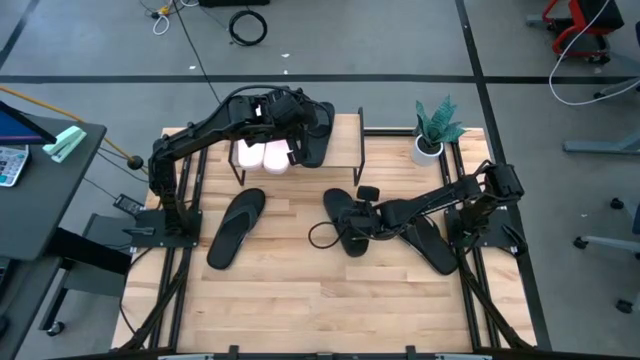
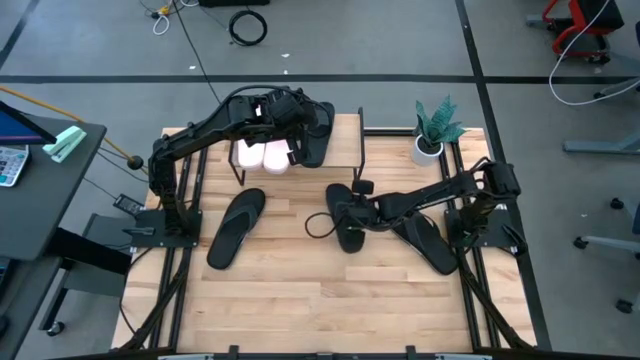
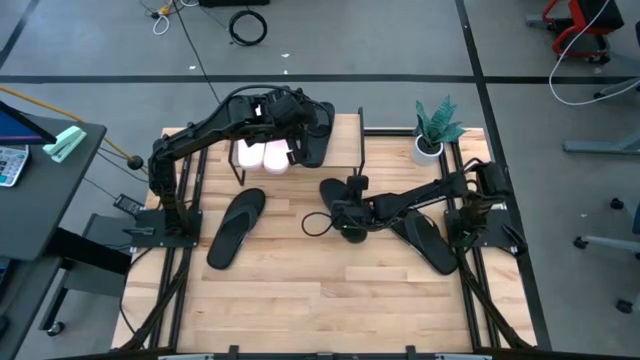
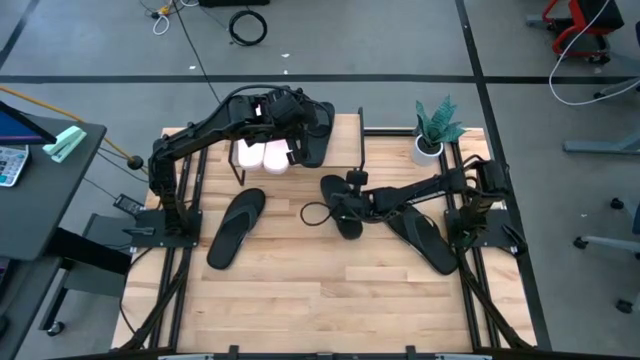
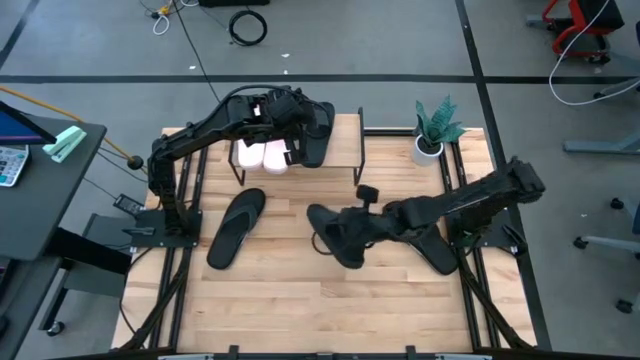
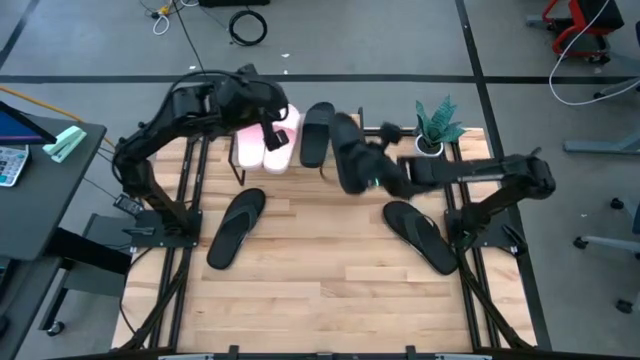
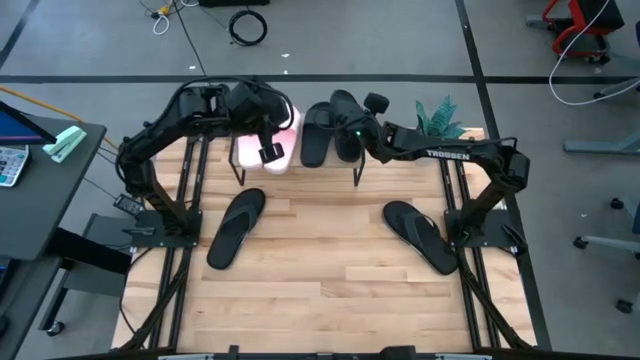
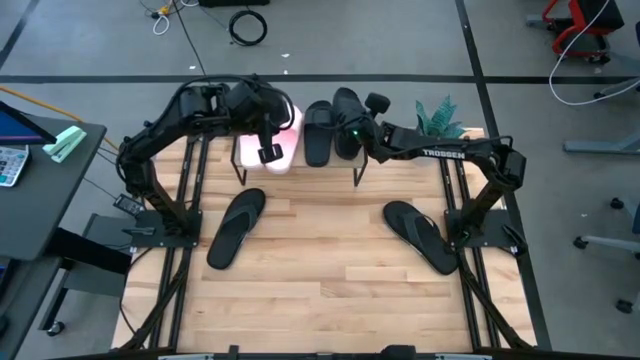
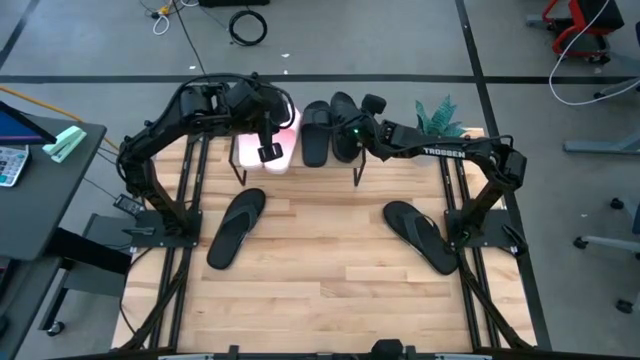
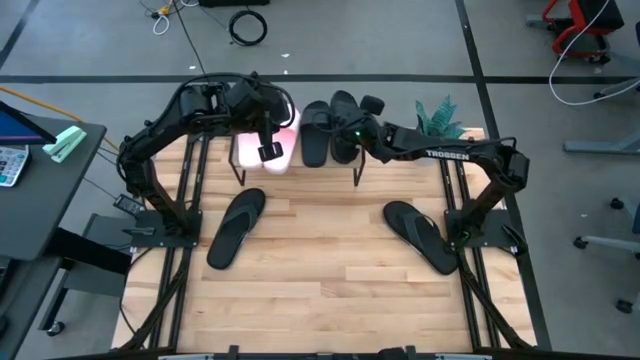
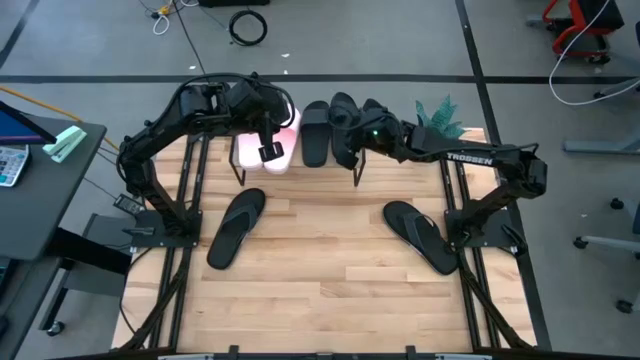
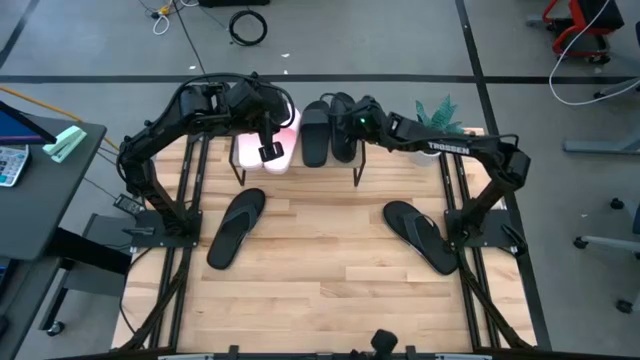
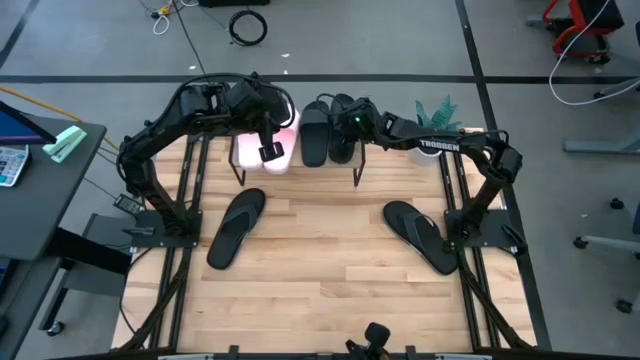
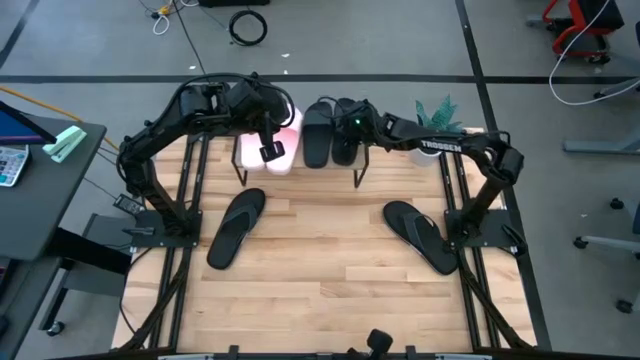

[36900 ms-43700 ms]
Task: Pick and place slides into the shelf
Put the middle black slides on the shelf aligned with the pink and black slides

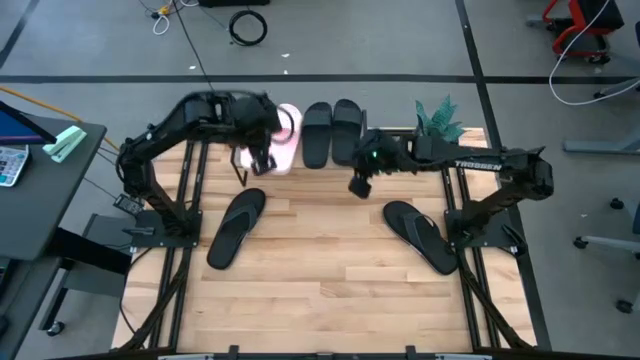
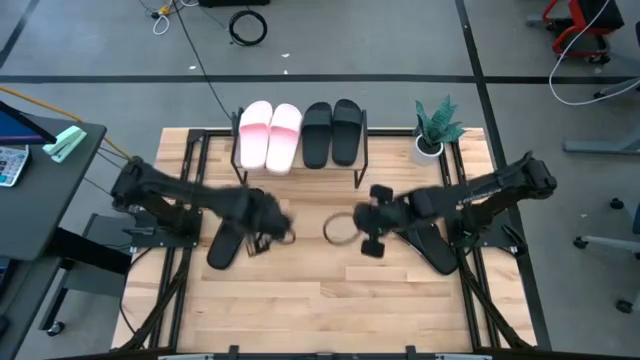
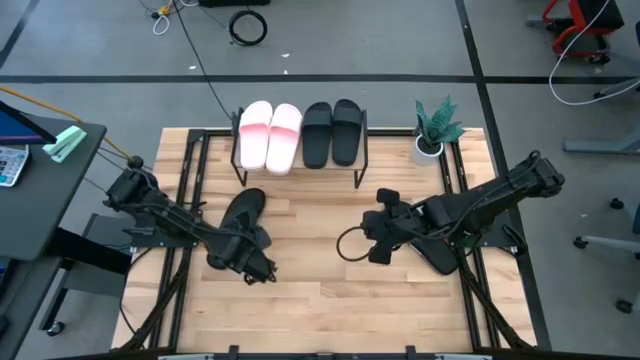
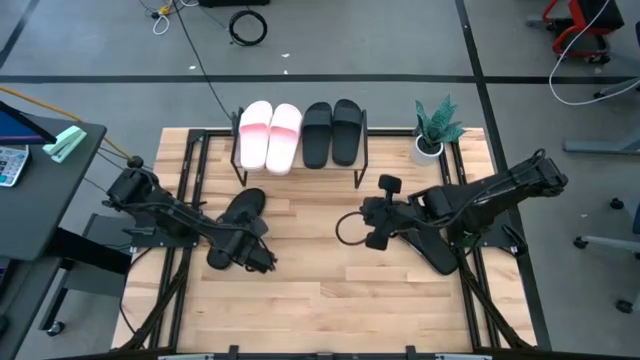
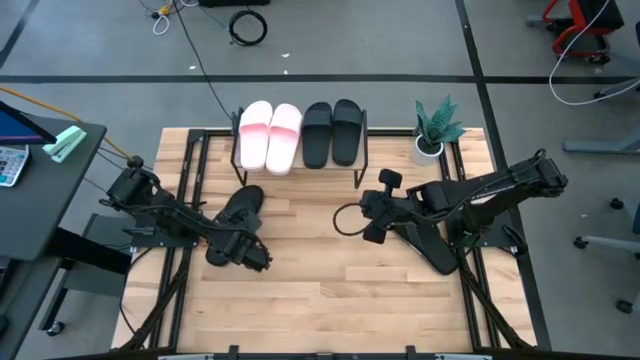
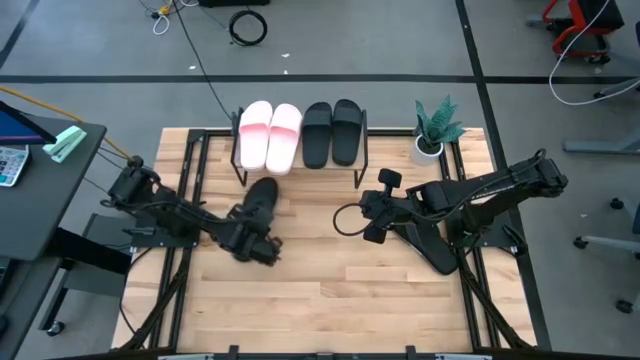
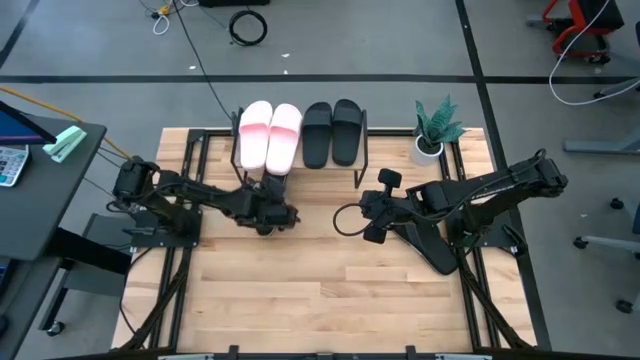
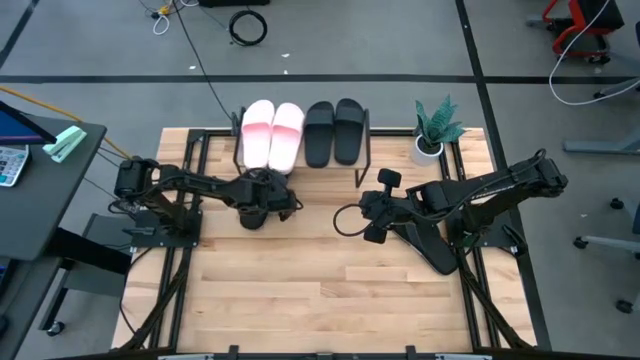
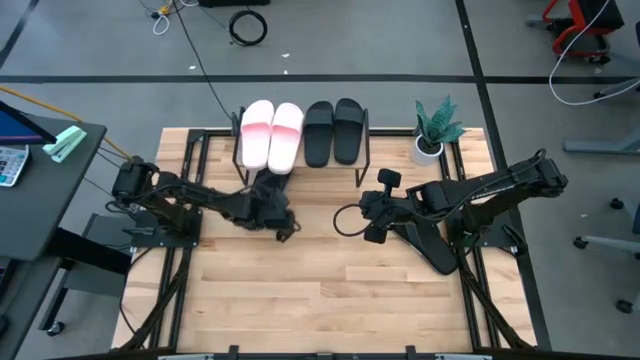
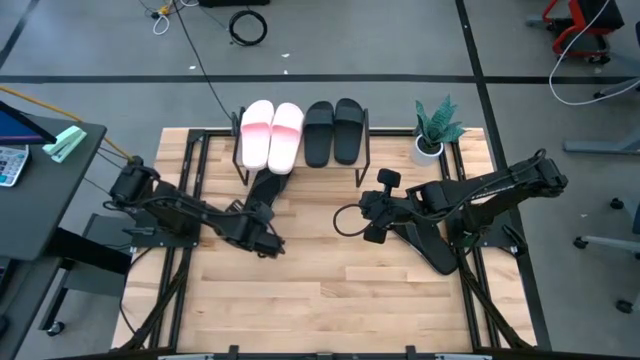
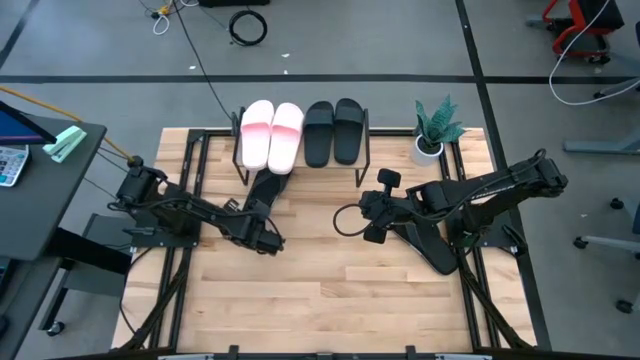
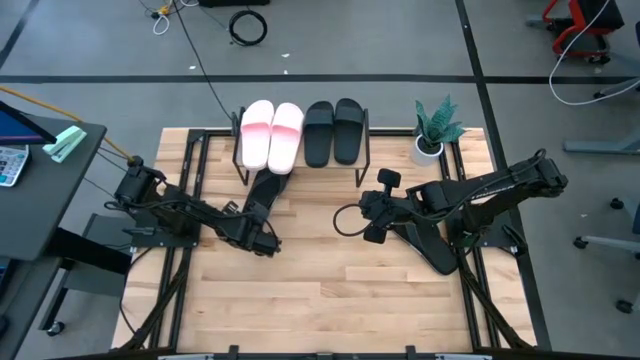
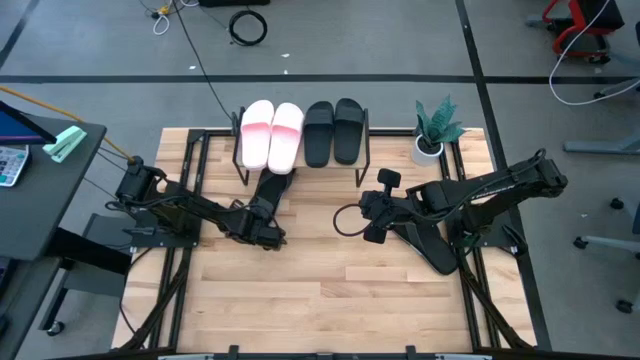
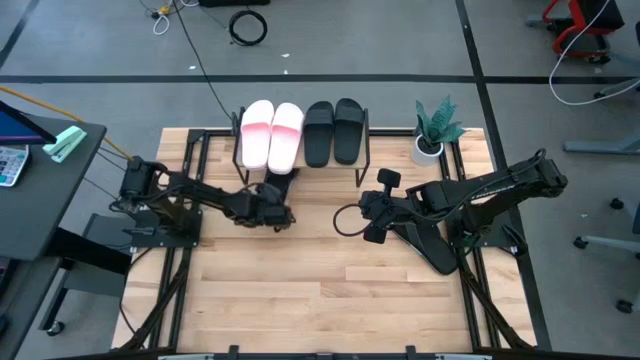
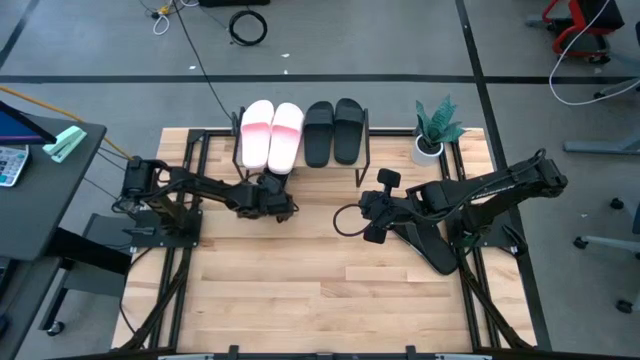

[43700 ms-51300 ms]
Move the left black slipper under the shelf

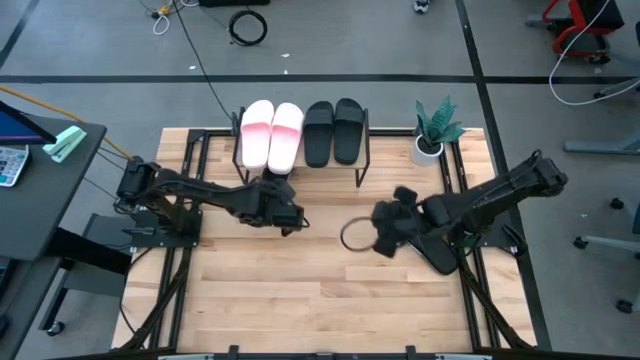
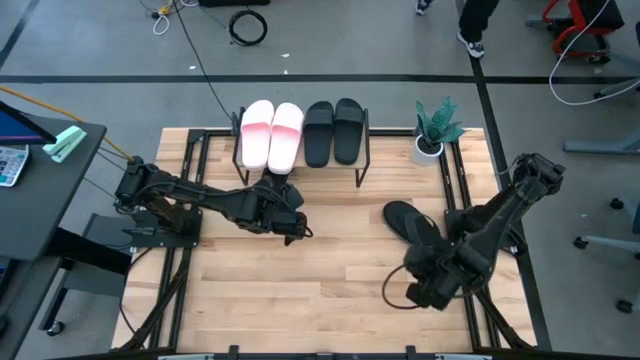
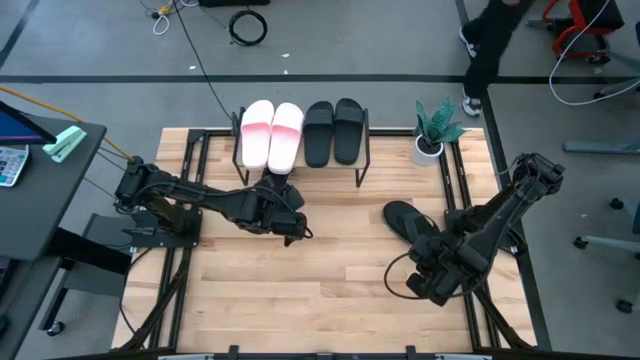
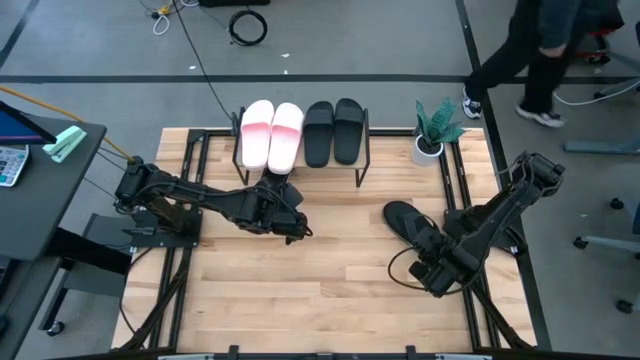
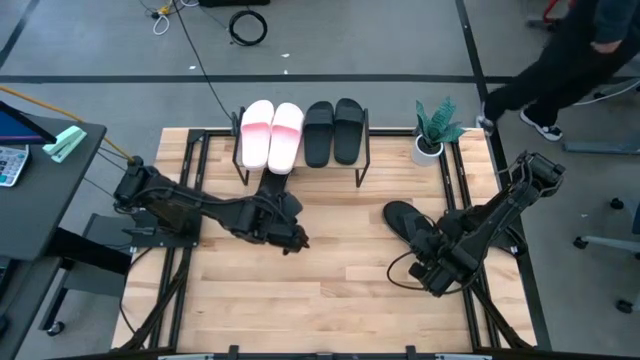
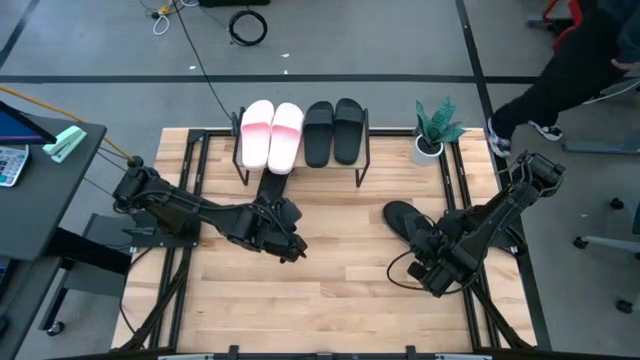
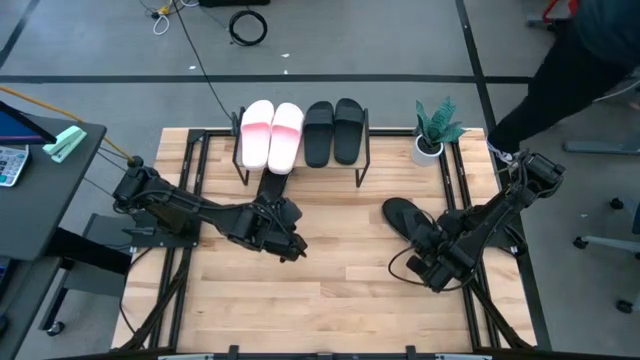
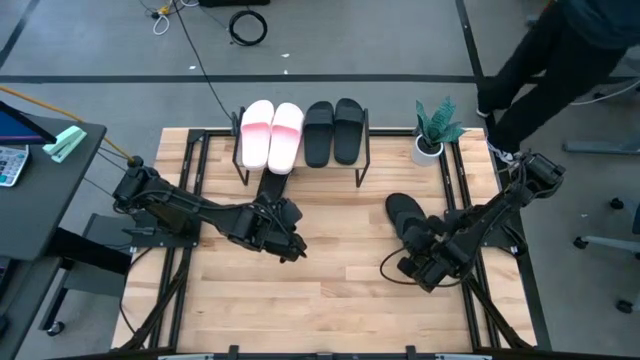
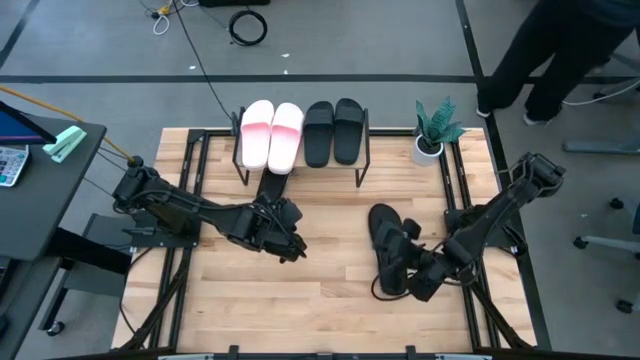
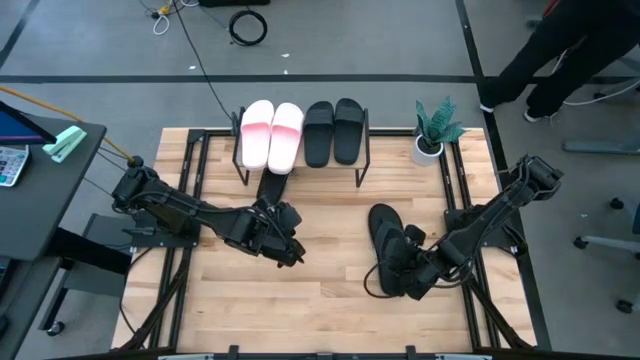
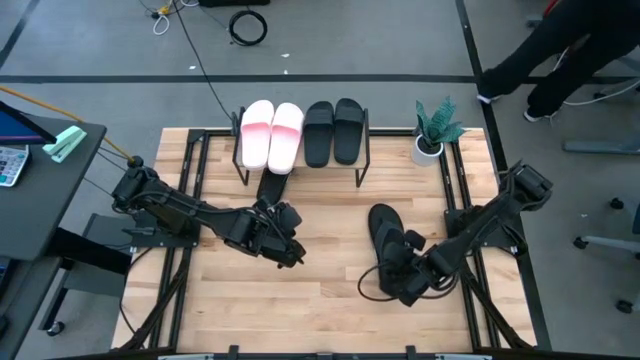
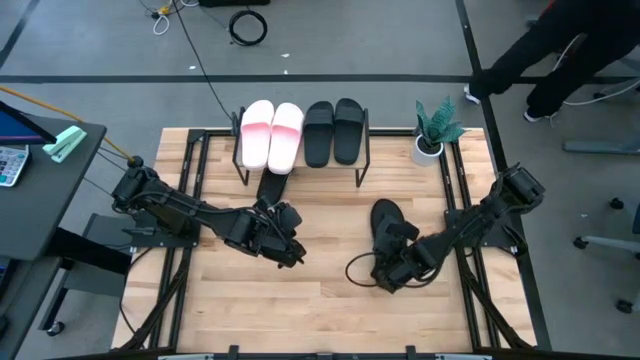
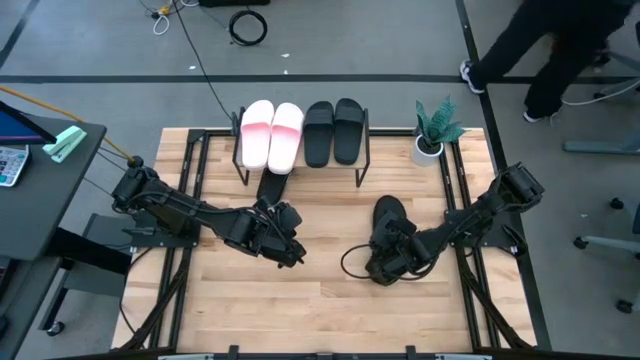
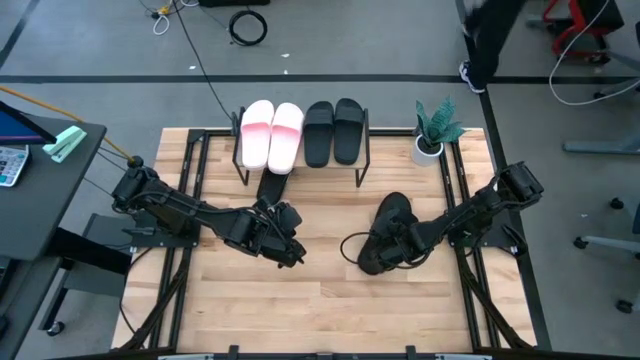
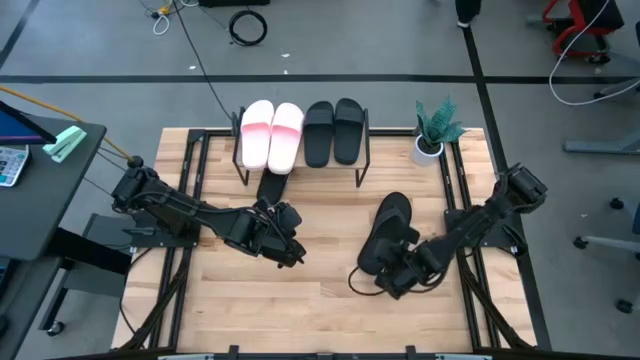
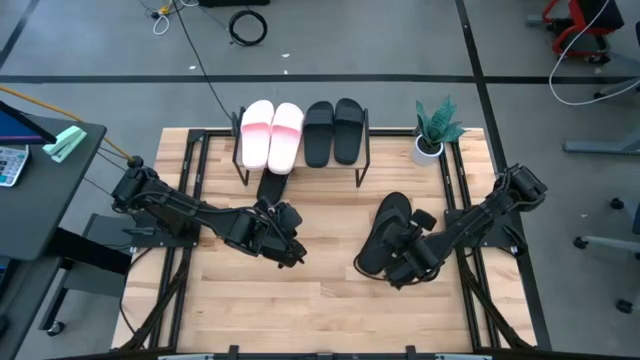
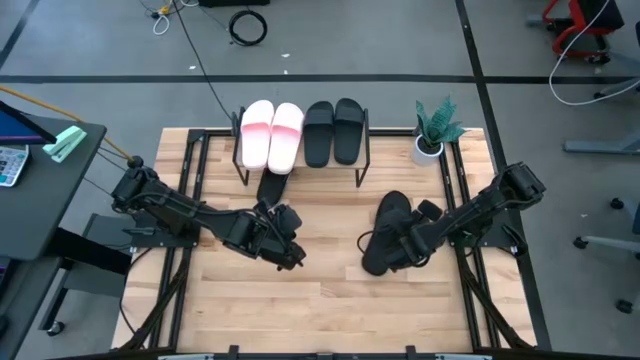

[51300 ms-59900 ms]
Move the black slipper under the shelf
